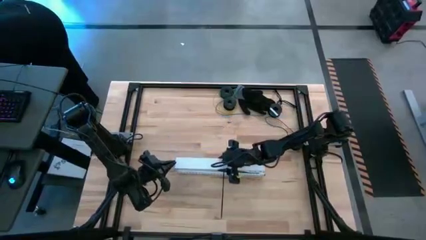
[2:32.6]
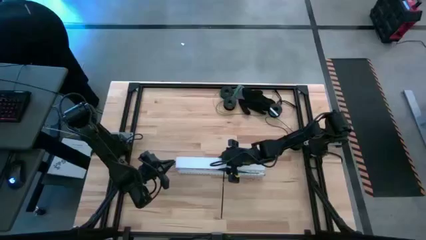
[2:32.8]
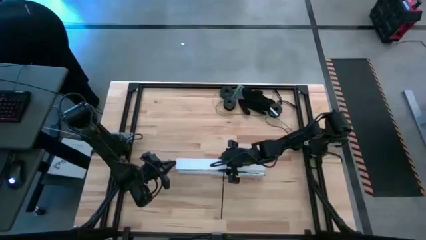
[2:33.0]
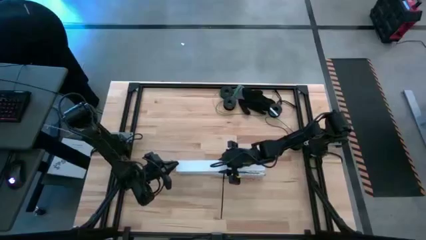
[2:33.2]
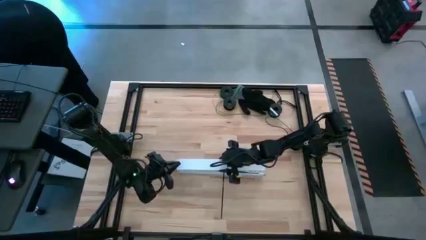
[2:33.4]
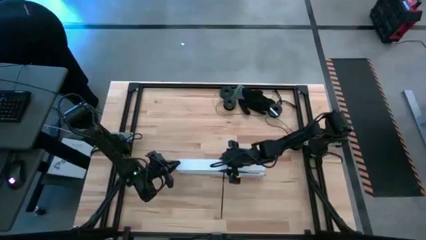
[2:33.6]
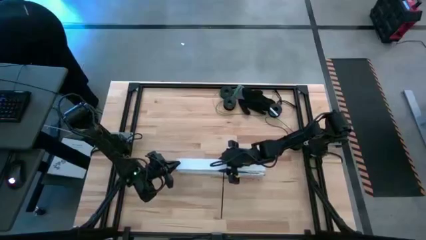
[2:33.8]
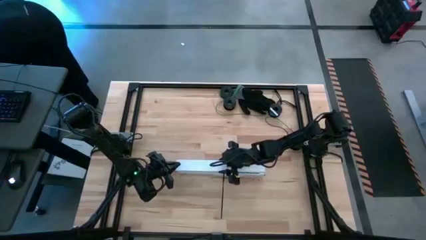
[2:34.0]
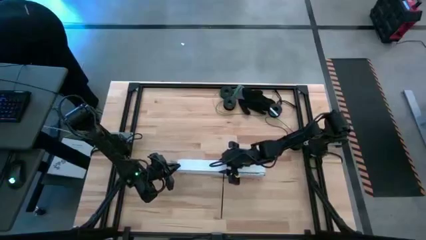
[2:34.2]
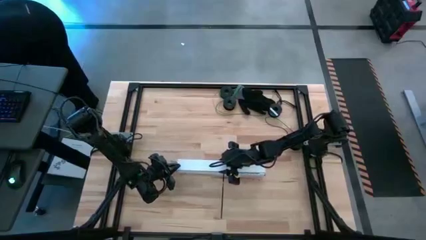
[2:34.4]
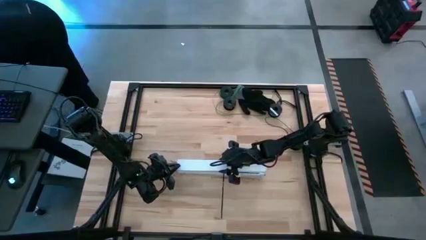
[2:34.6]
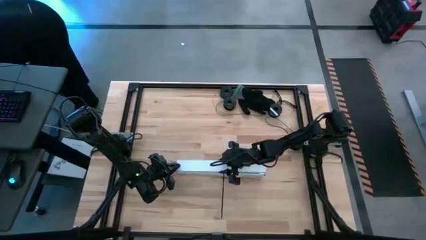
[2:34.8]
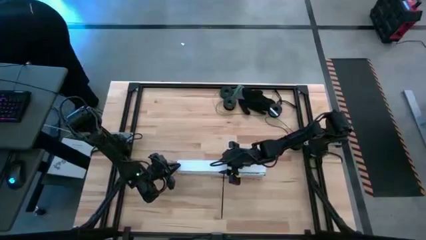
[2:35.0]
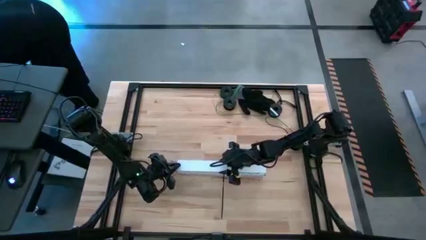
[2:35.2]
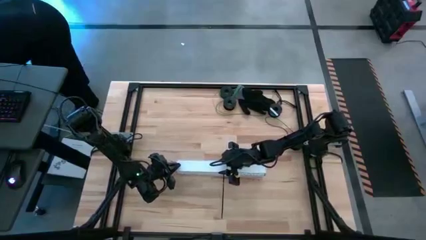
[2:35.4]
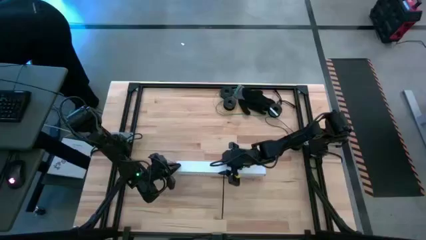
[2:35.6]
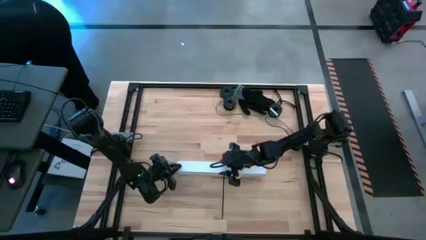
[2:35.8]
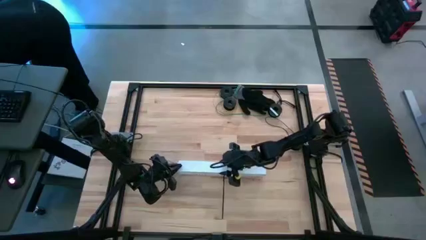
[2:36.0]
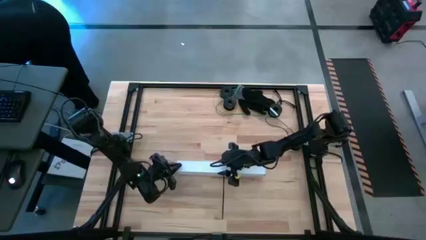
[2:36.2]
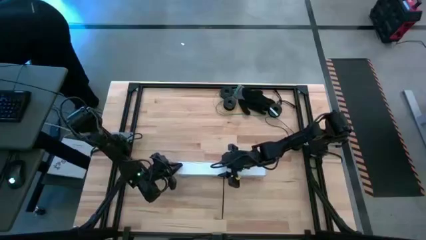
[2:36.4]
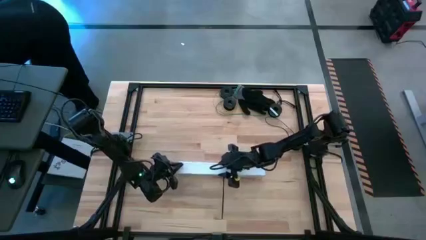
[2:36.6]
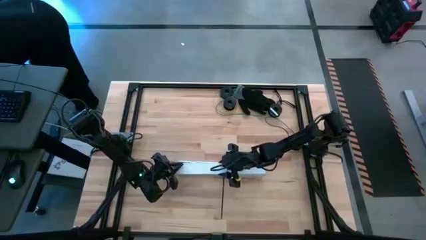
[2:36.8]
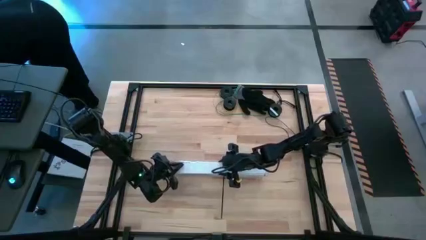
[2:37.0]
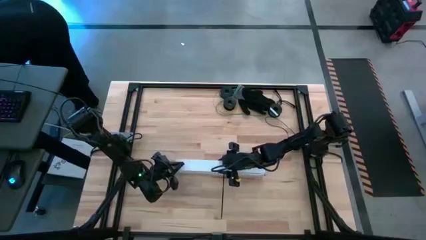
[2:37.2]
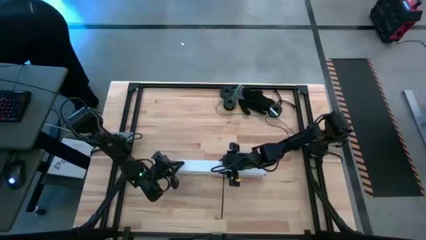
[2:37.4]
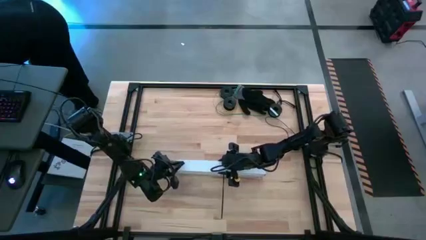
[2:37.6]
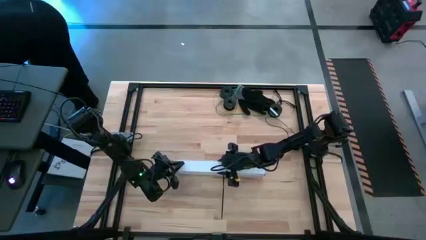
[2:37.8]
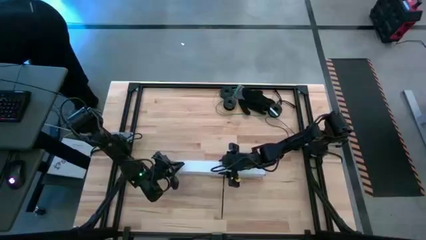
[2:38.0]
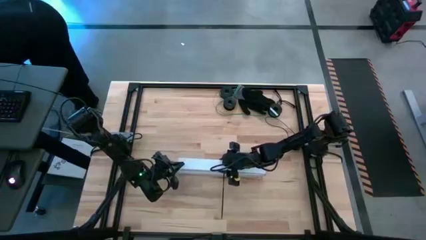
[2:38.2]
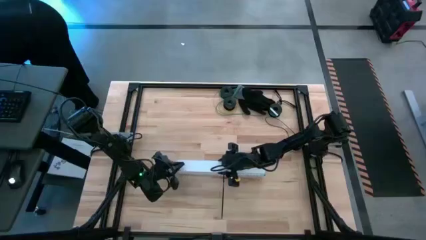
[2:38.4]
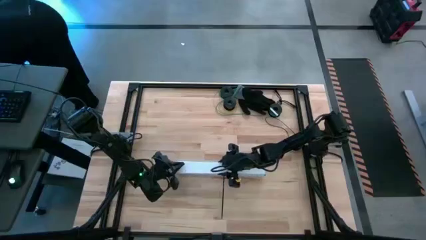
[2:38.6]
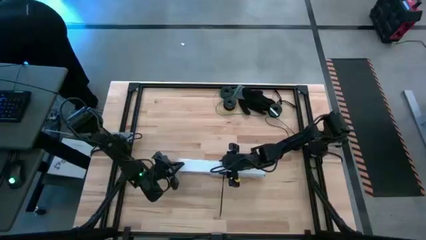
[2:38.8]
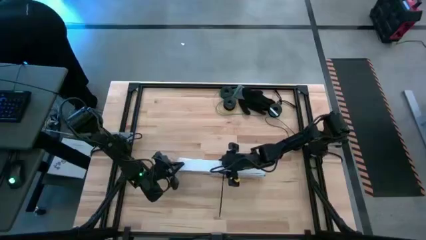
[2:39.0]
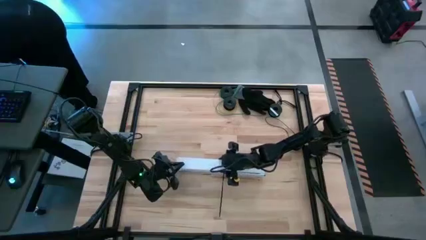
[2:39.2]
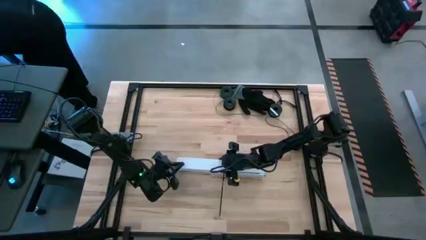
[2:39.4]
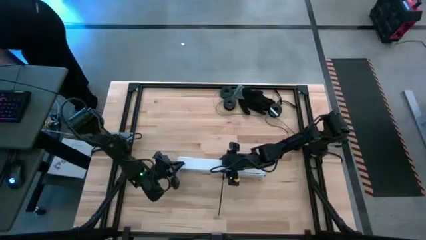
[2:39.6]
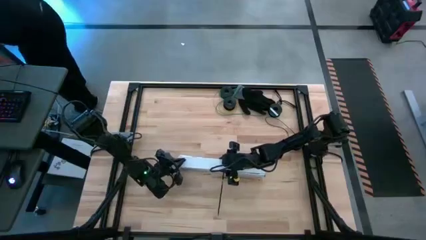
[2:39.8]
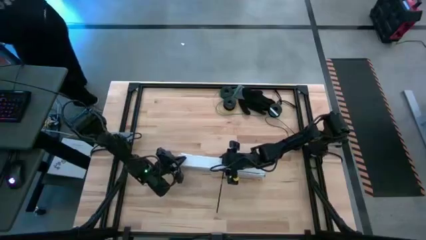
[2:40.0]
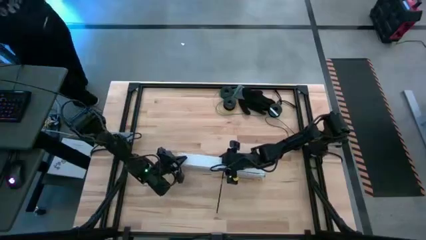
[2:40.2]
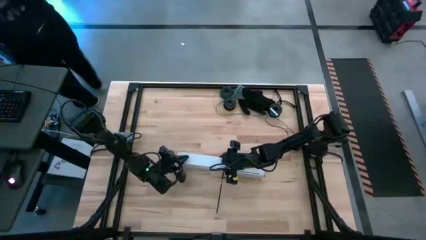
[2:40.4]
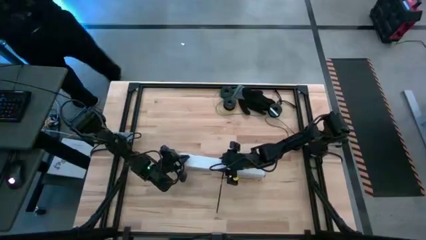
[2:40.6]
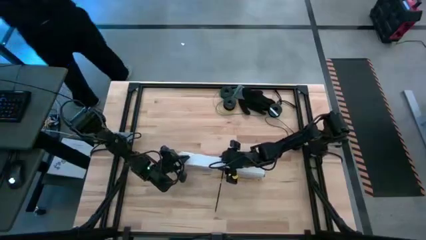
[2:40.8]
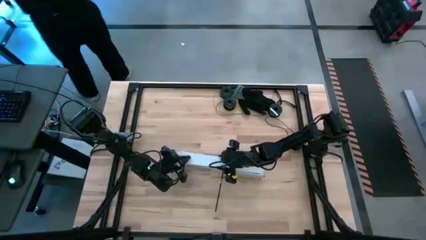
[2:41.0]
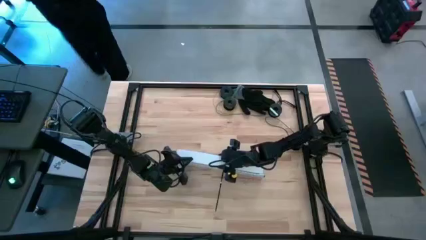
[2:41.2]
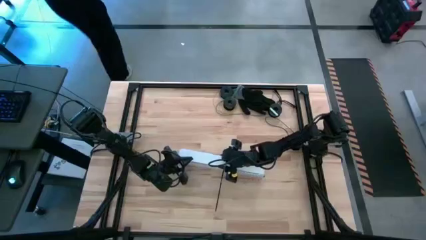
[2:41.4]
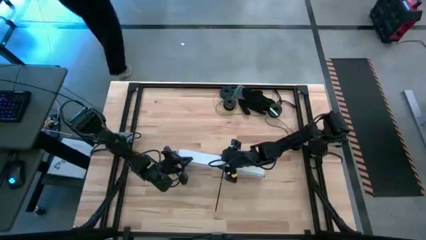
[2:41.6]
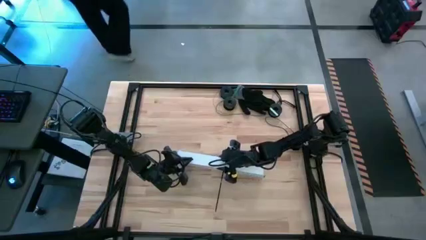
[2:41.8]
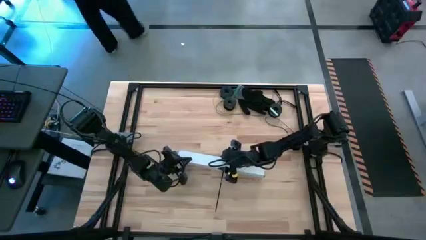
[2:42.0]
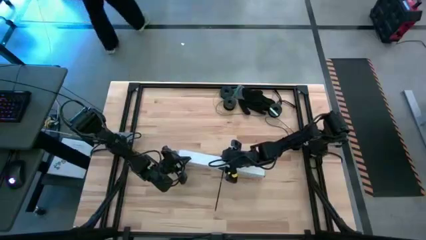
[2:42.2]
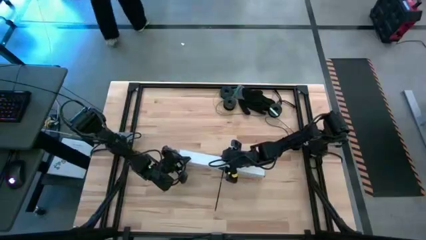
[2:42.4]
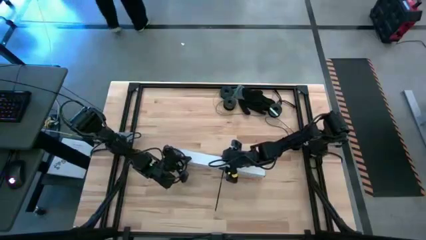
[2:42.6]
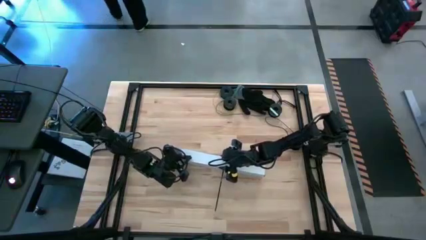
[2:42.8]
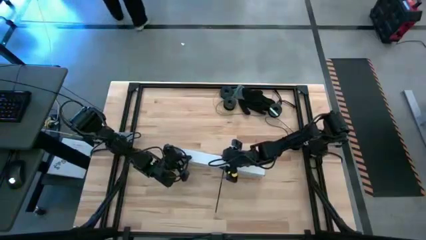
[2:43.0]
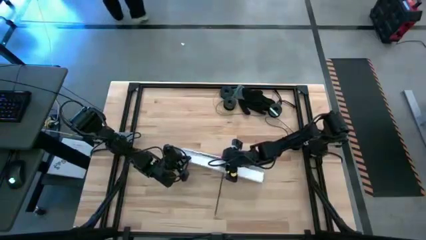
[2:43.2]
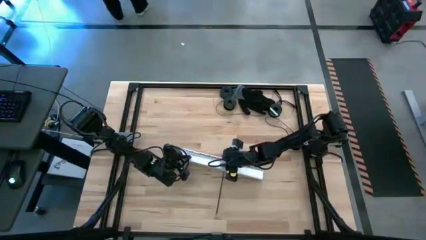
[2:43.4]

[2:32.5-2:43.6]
Task: Ziptie cables
Close the white cable duct

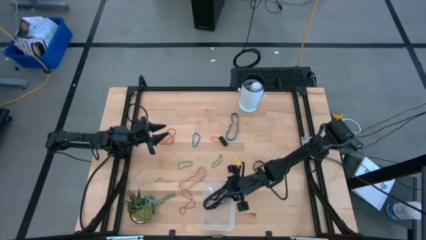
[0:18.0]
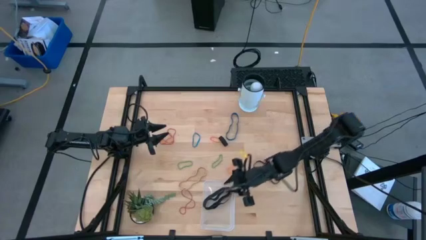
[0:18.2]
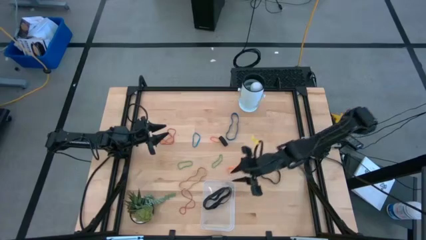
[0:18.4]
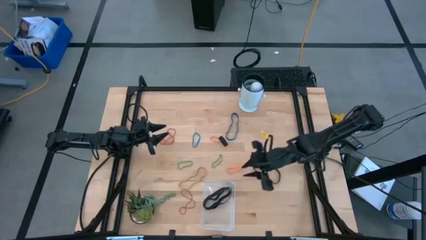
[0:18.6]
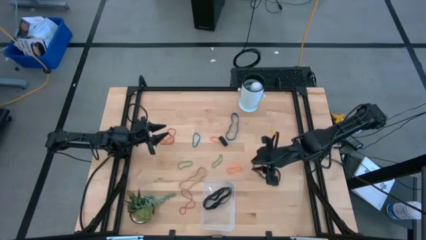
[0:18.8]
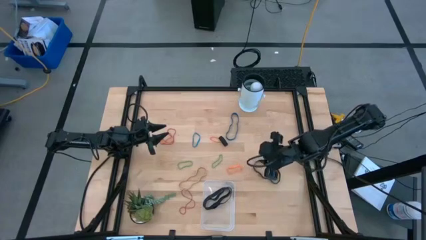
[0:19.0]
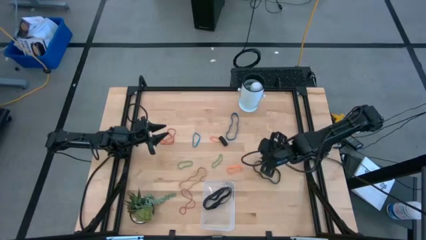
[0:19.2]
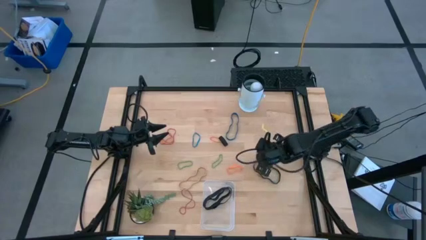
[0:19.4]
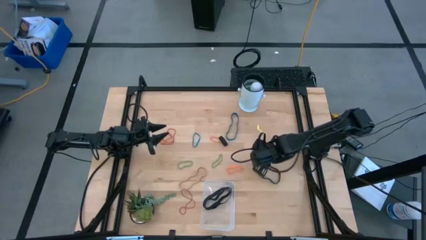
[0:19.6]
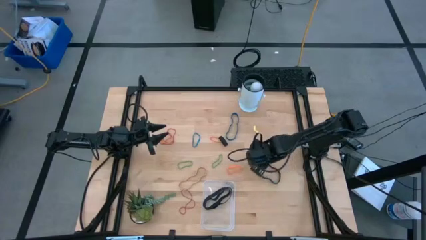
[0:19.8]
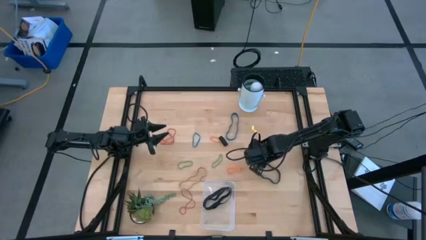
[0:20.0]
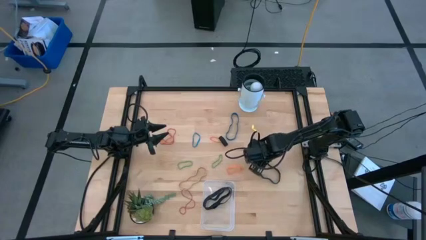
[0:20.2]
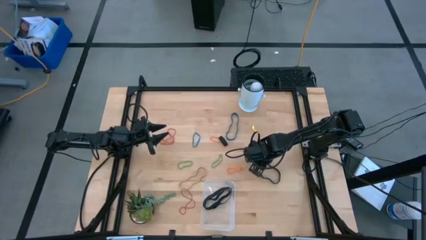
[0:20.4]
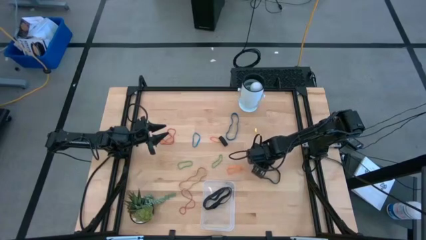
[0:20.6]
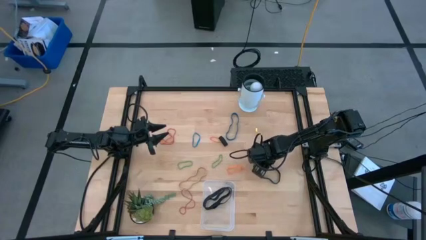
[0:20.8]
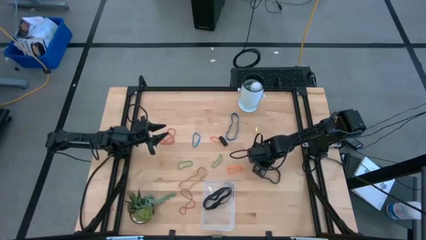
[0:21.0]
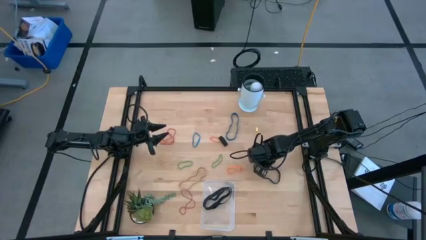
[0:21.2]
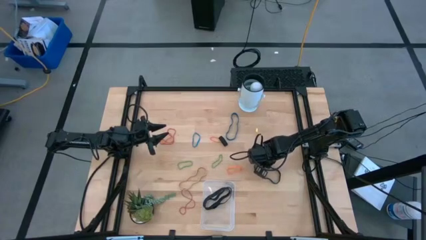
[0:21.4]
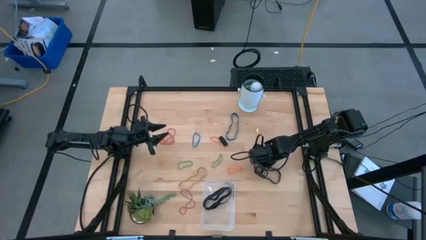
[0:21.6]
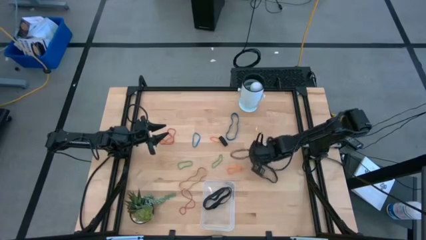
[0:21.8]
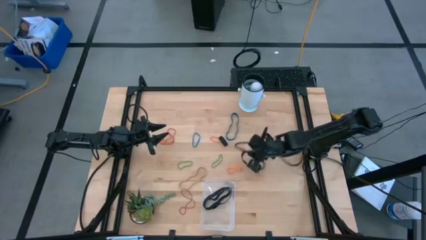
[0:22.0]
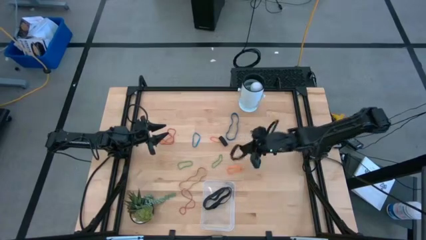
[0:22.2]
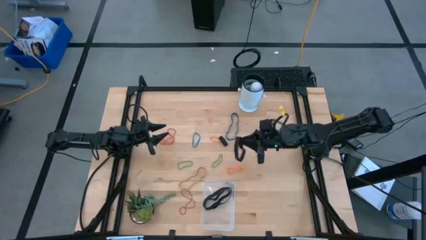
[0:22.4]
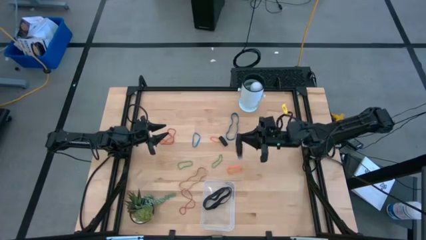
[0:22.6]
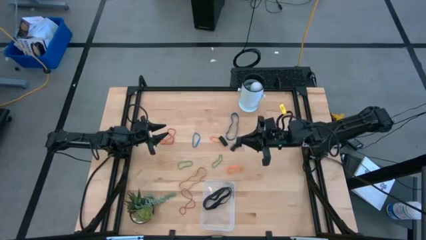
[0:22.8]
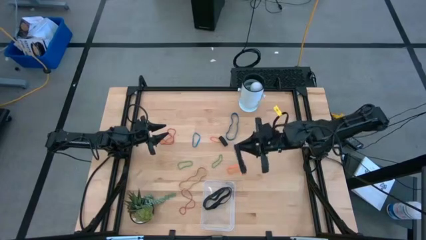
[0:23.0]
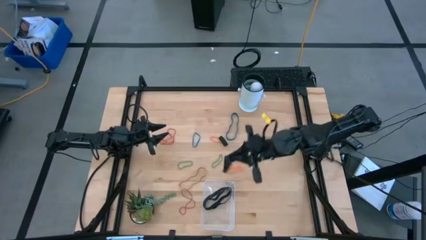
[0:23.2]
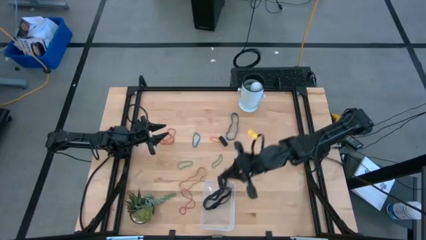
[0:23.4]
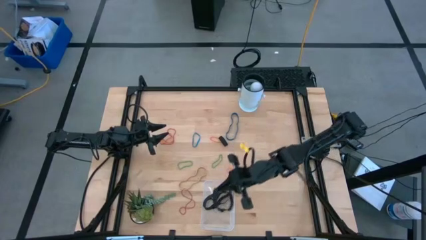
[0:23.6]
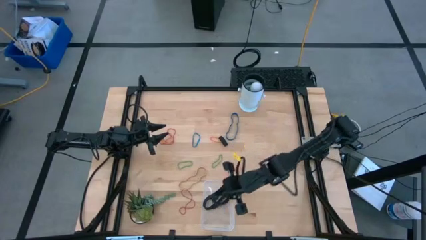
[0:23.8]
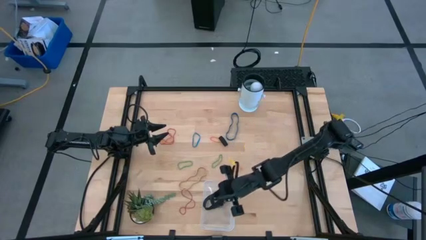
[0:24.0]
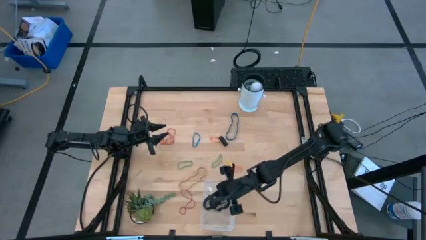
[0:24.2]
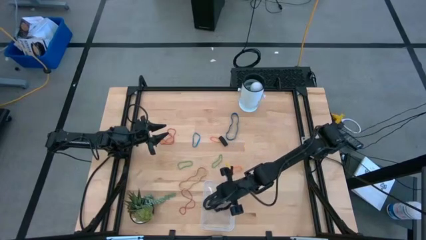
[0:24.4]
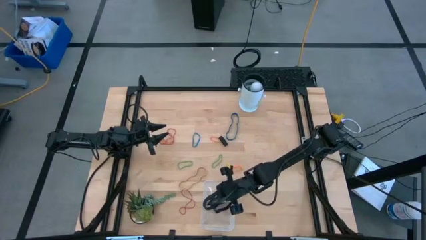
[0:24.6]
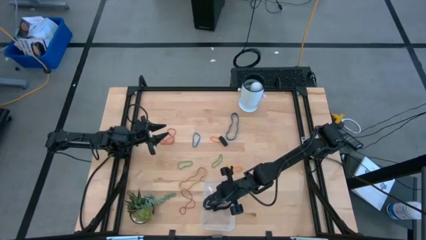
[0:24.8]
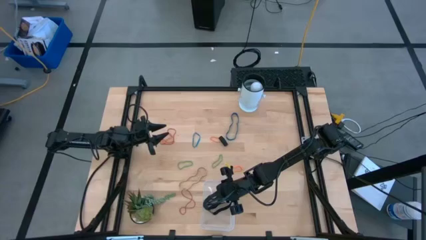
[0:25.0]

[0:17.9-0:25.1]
Task: Pick and place rubber bands into bin
Put the black rubber band into the transparent bin
